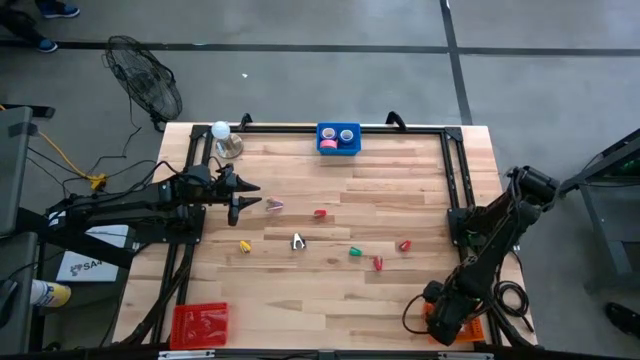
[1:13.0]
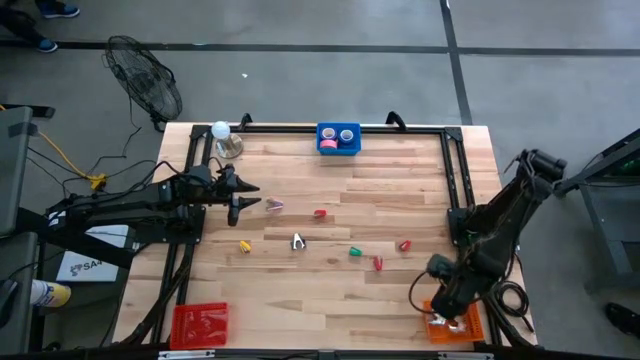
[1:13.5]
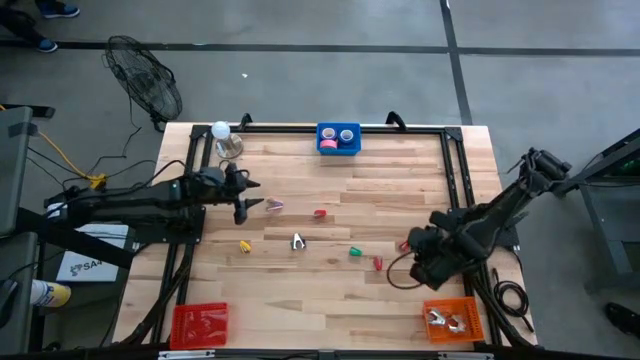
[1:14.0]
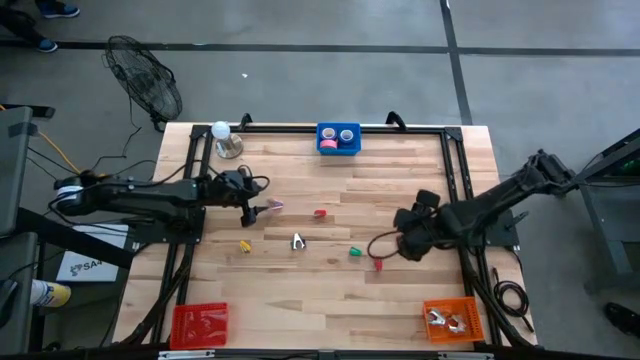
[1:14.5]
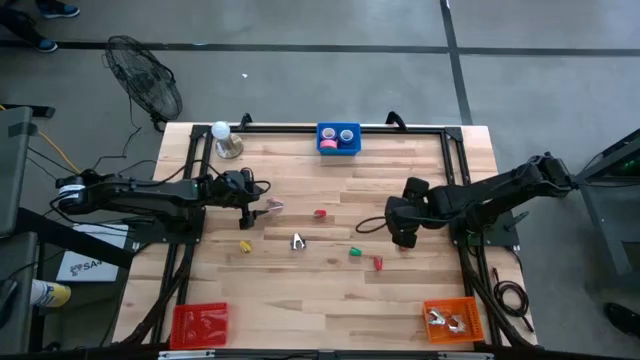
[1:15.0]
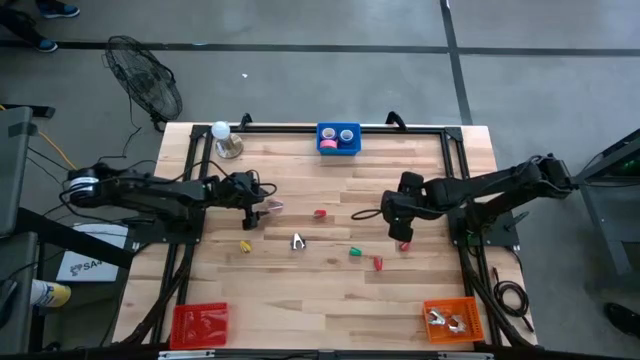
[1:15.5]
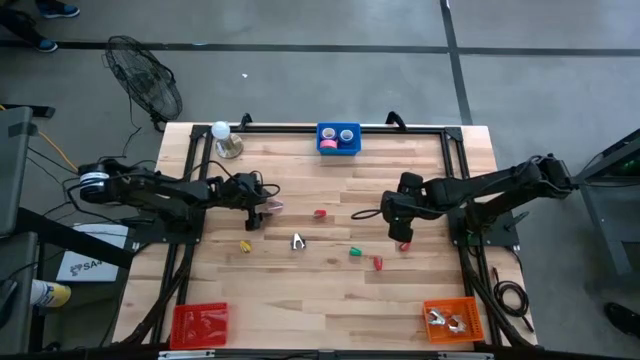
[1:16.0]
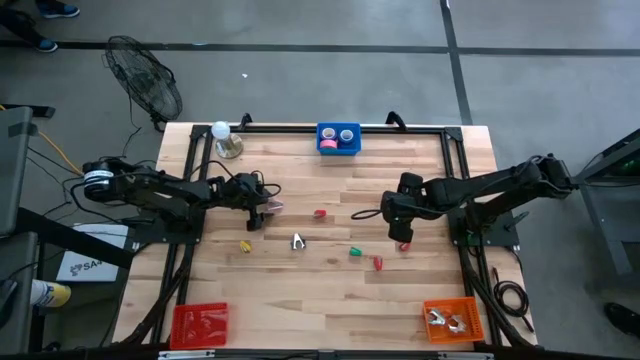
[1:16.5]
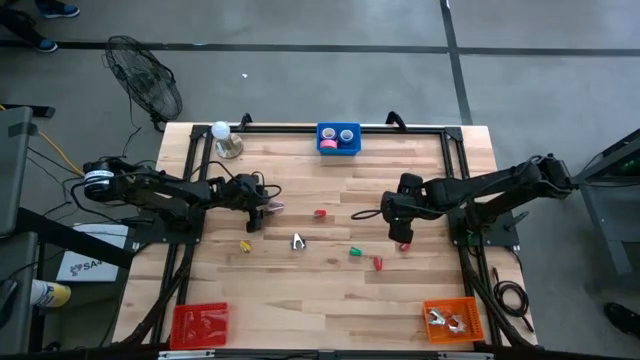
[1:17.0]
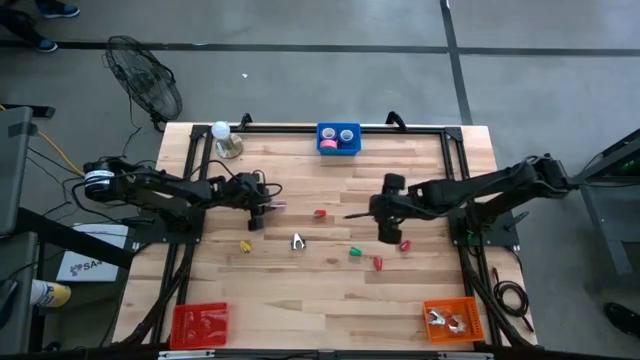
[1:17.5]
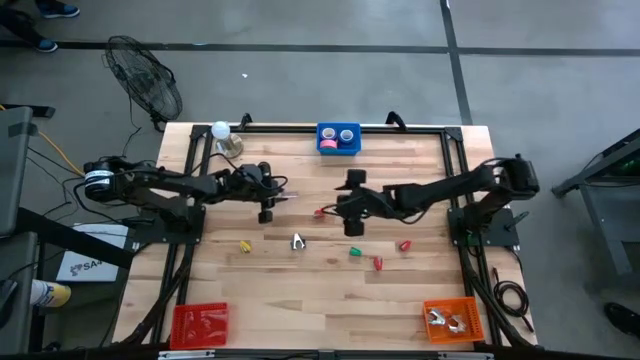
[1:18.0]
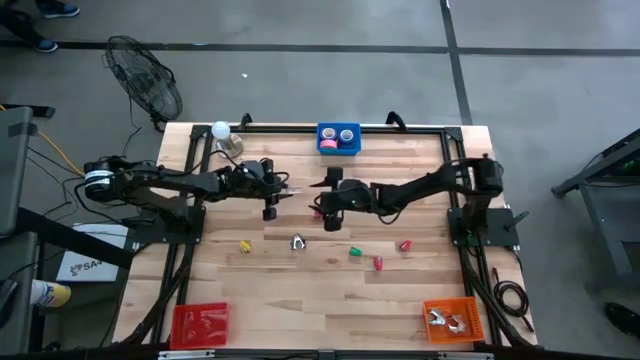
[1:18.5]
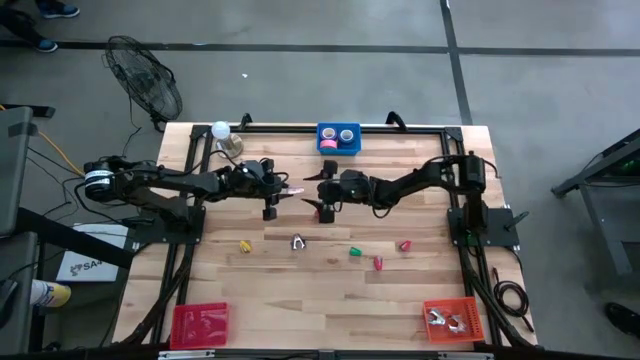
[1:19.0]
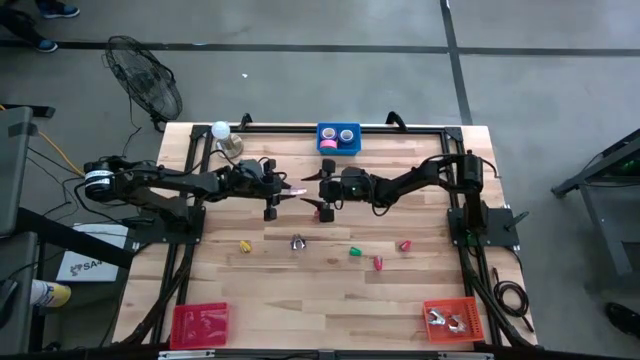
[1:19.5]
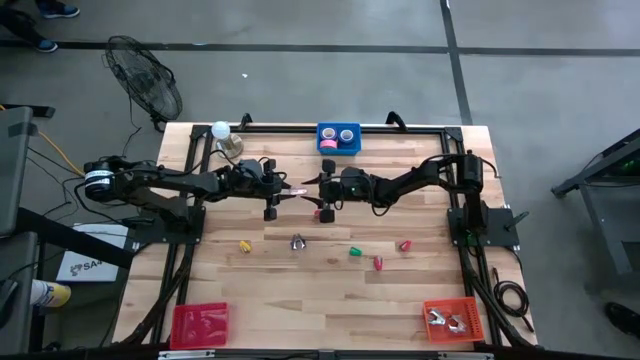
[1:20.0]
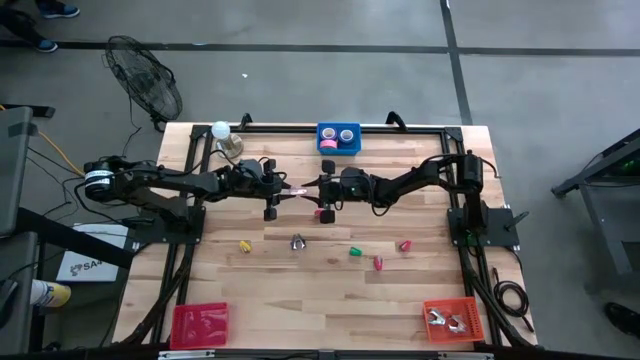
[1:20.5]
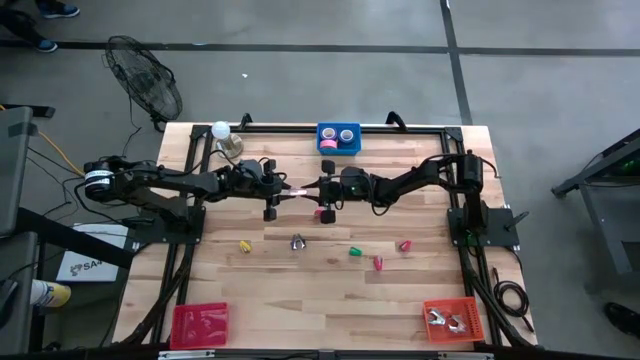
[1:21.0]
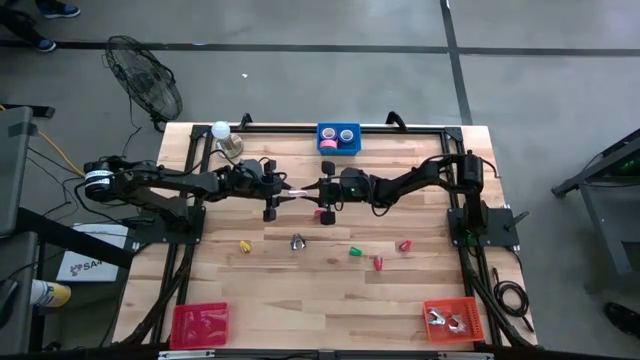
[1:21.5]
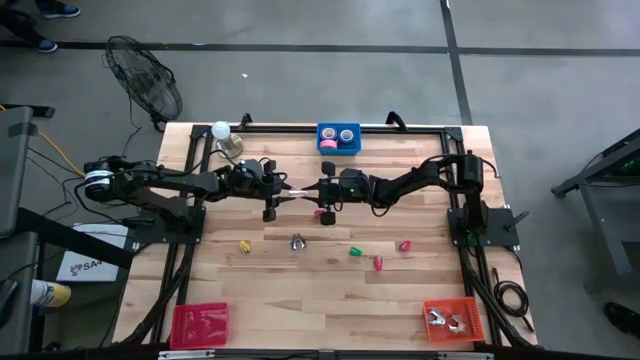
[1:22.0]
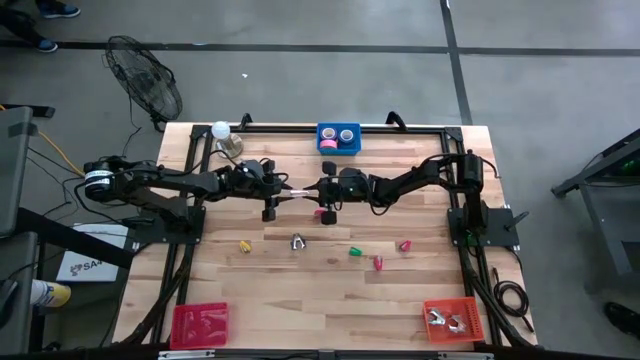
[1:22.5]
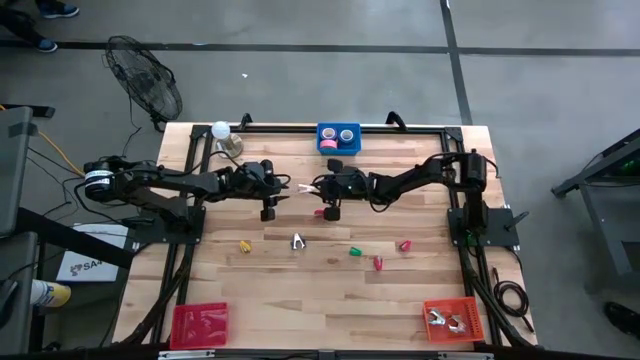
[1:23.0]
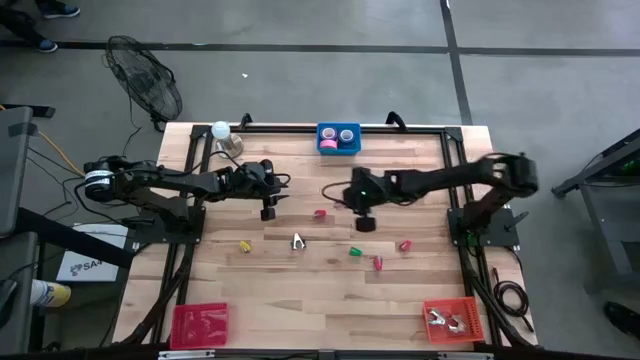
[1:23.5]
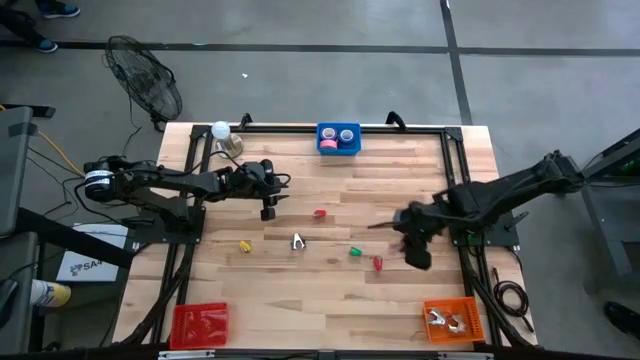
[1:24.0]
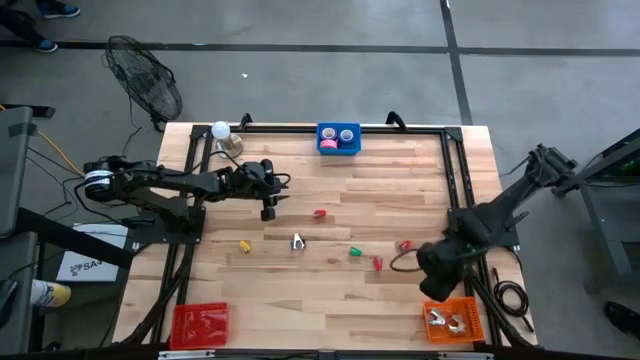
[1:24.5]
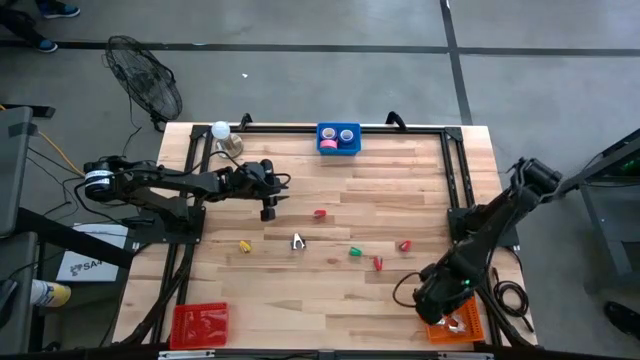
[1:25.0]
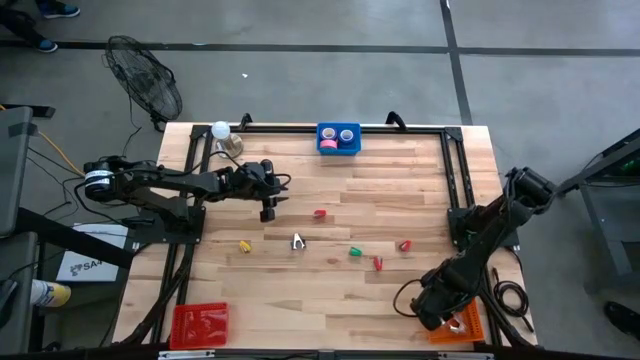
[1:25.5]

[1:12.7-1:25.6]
Task: Pick and place Stapler, Stapler remover, tape
Put the pink staple remover into the orange bin

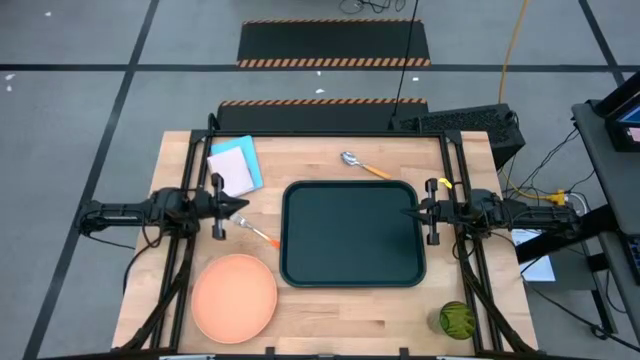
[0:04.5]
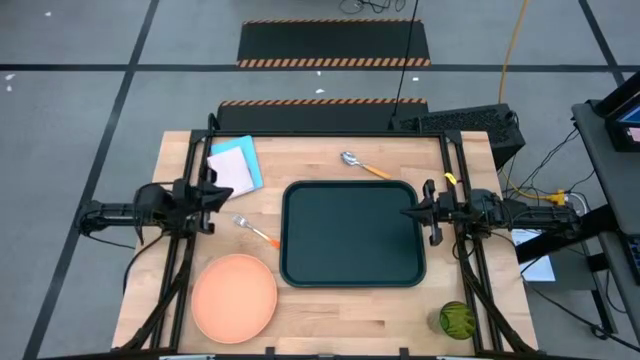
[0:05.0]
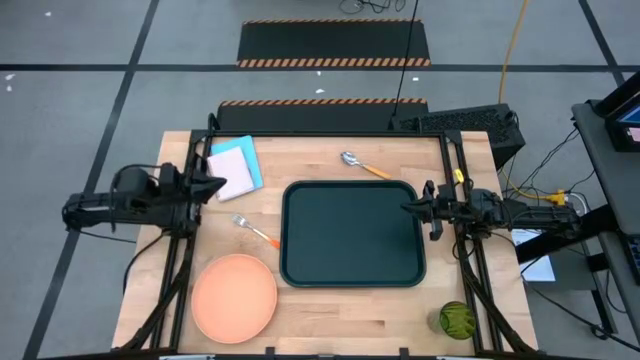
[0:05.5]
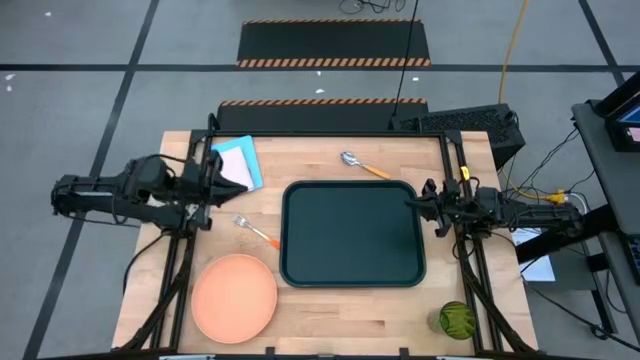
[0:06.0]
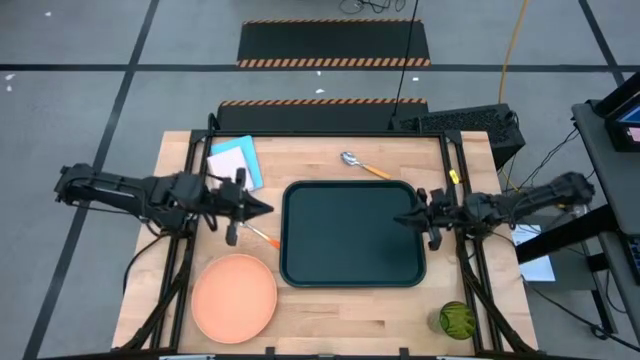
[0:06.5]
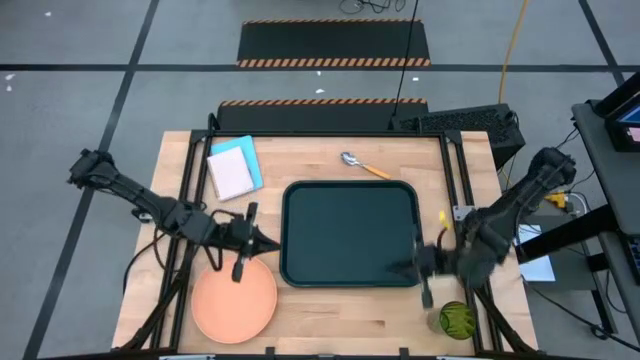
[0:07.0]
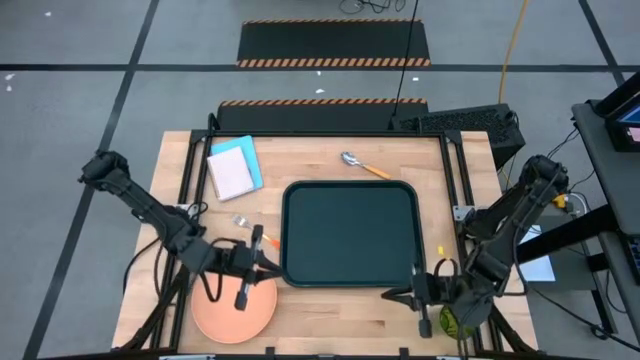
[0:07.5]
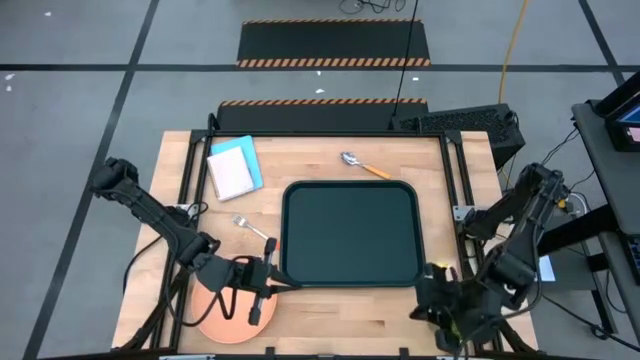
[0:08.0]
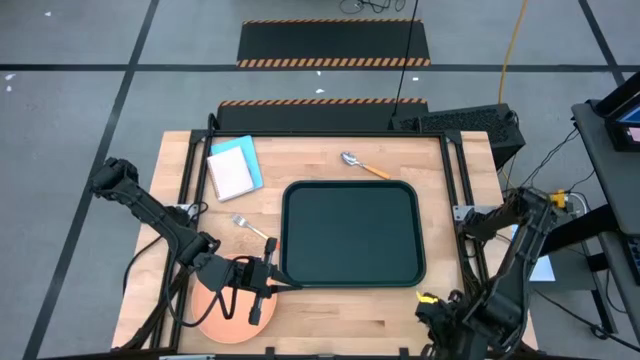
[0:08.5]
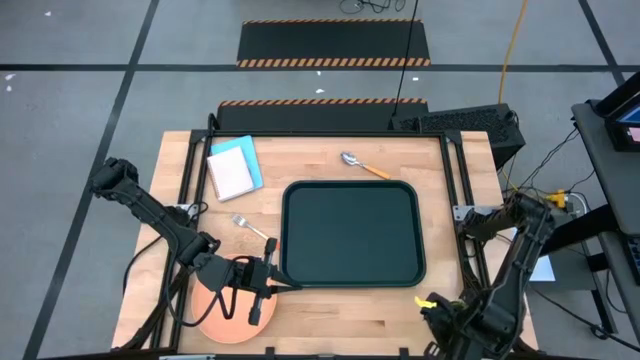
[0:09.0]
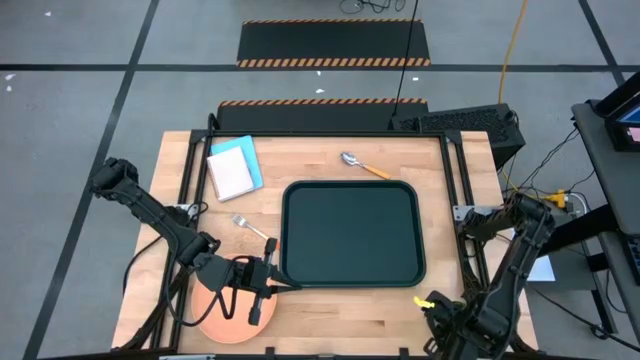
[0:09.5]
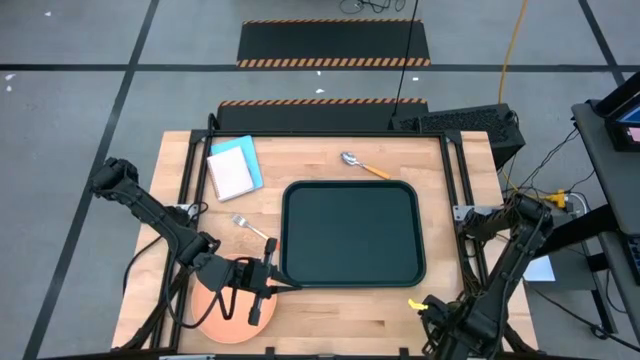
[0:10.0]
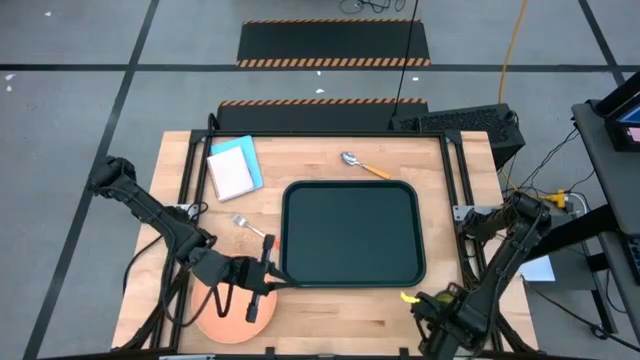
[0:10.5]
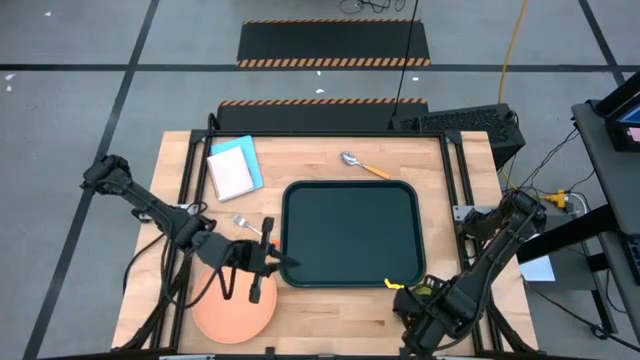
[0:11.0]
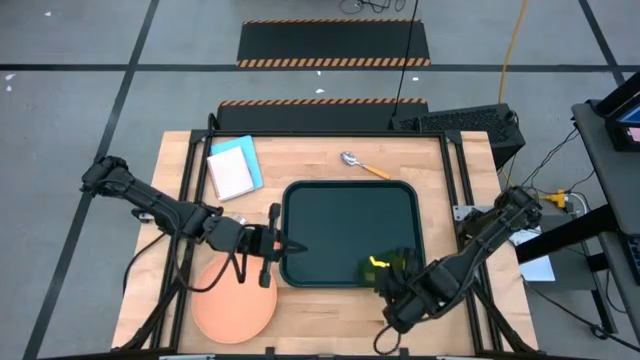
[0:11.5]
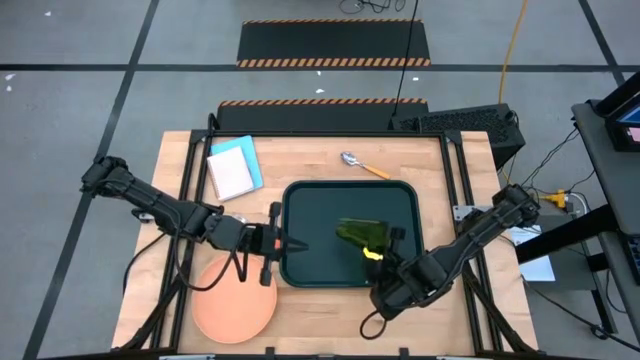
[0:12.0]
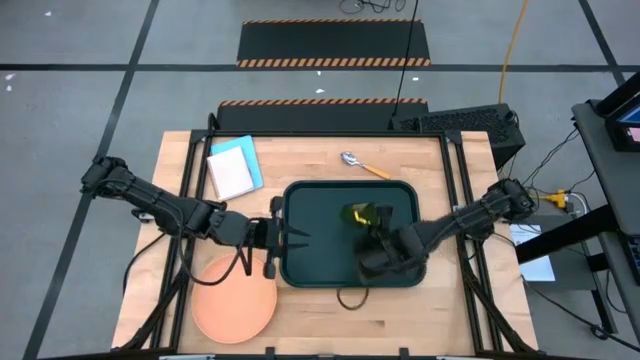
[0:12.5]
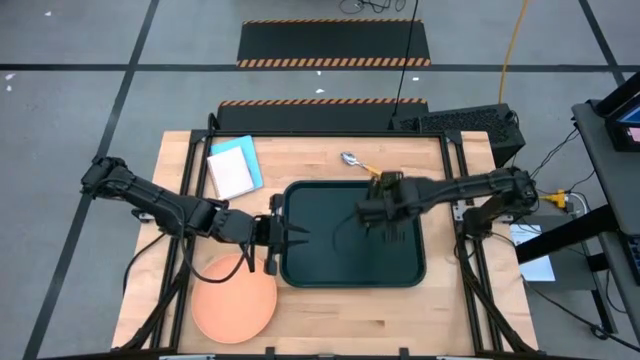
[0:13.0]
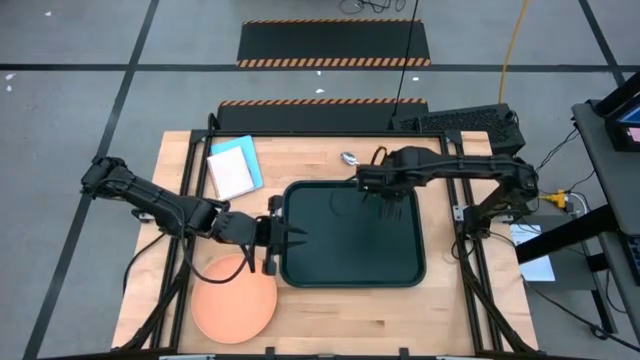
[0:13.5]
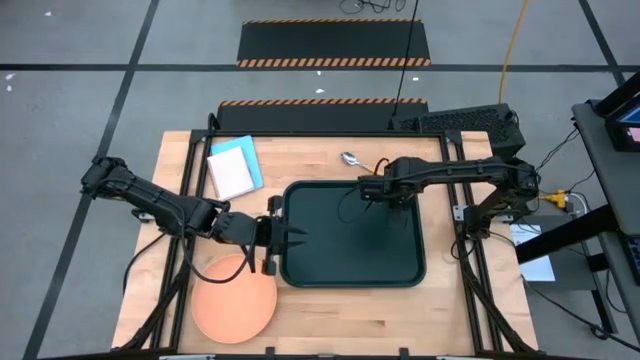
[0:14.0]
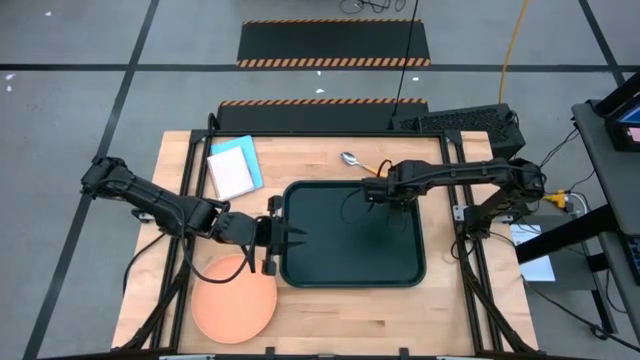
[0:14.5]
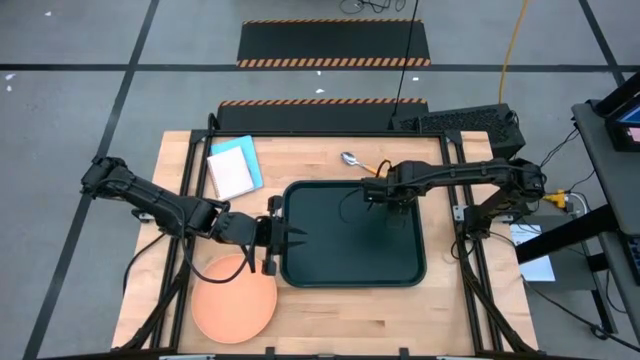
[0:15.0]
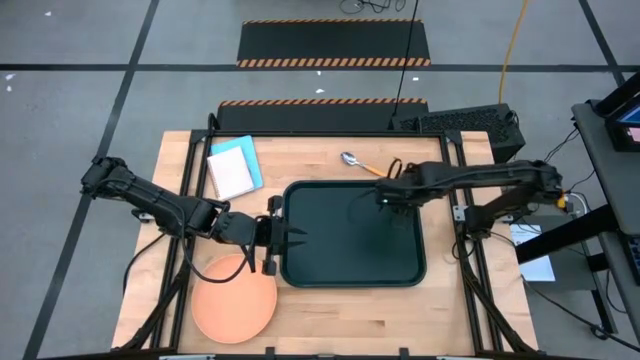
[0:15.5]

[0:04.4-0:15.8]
Task: Pick and place plate/cup/fork/spoon on tray
Put the cup on the green tray
